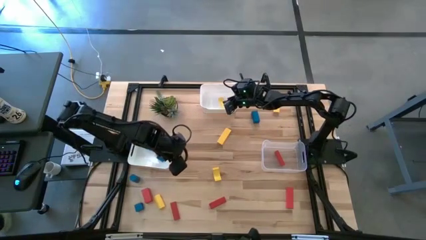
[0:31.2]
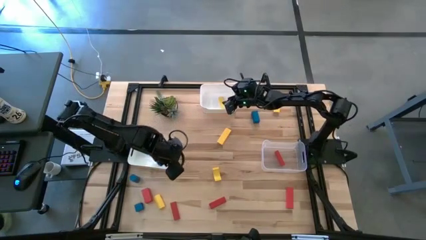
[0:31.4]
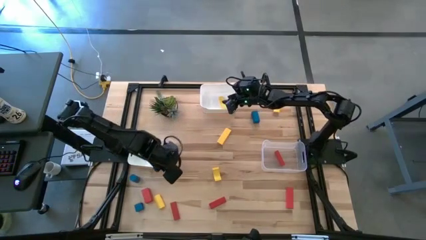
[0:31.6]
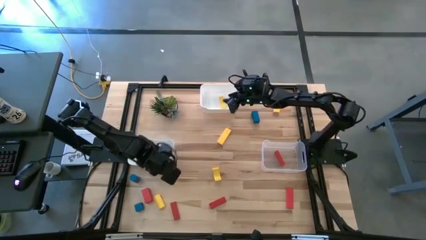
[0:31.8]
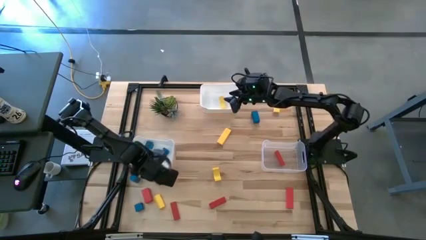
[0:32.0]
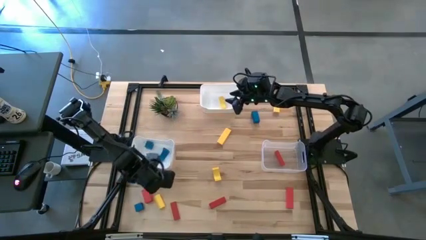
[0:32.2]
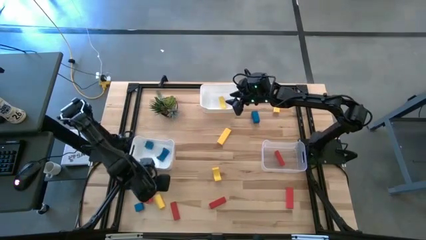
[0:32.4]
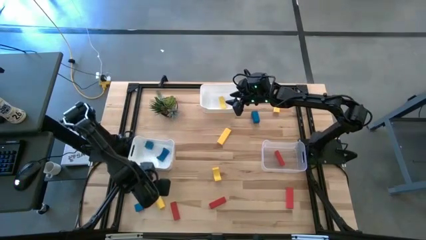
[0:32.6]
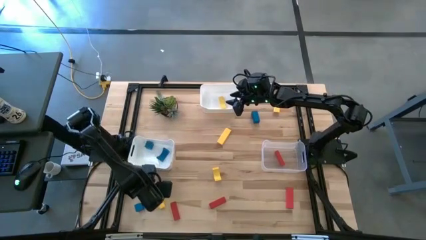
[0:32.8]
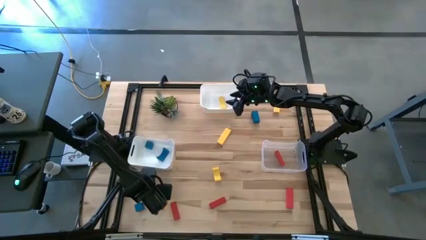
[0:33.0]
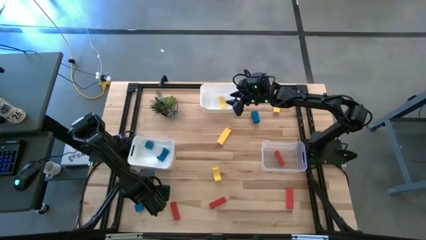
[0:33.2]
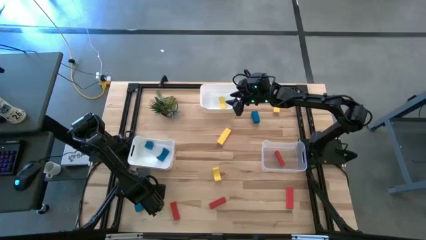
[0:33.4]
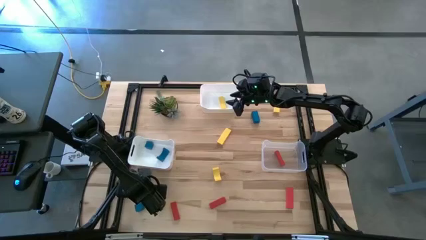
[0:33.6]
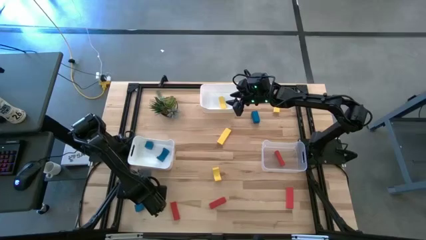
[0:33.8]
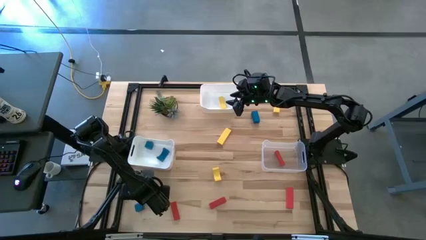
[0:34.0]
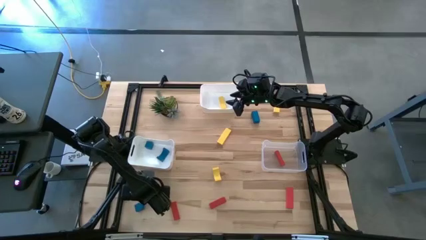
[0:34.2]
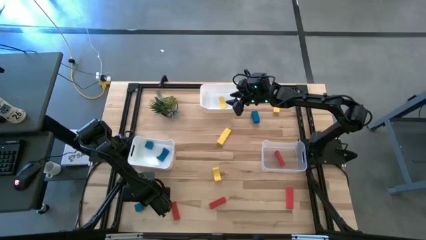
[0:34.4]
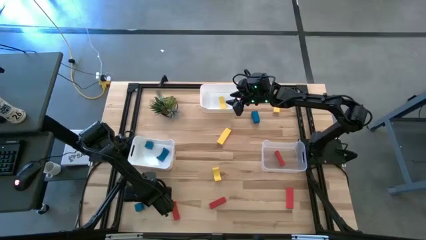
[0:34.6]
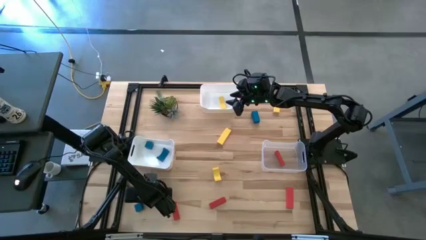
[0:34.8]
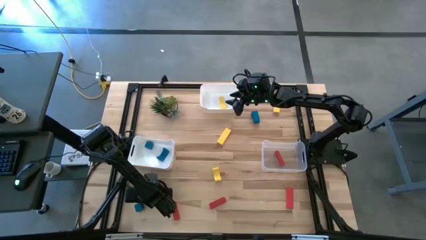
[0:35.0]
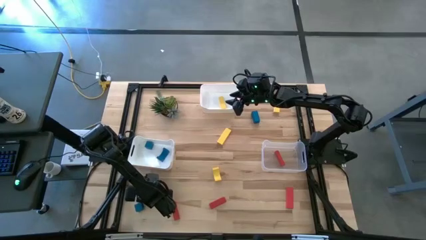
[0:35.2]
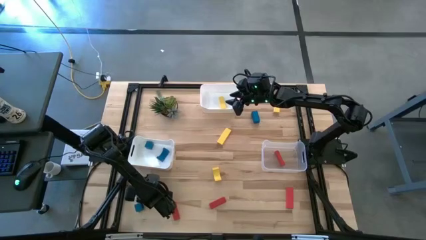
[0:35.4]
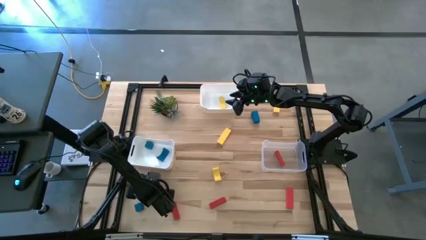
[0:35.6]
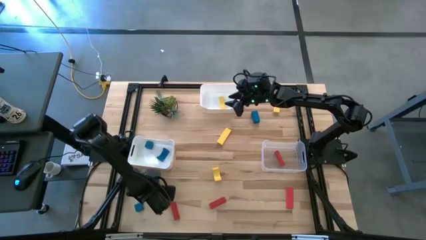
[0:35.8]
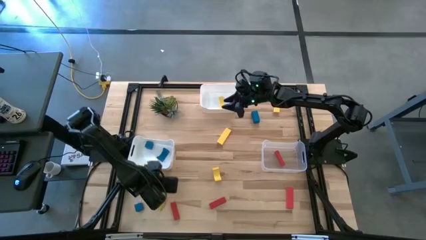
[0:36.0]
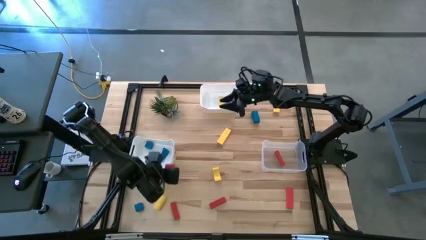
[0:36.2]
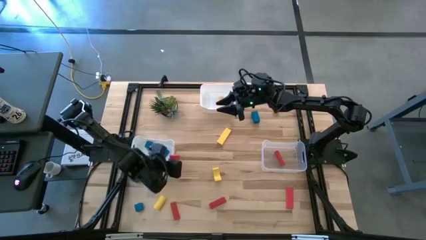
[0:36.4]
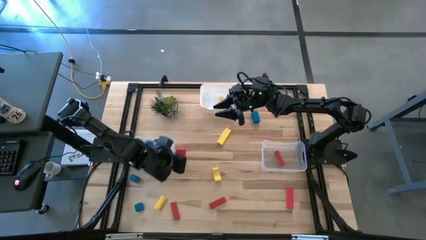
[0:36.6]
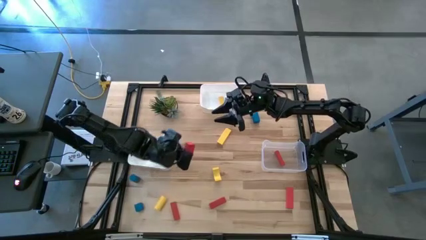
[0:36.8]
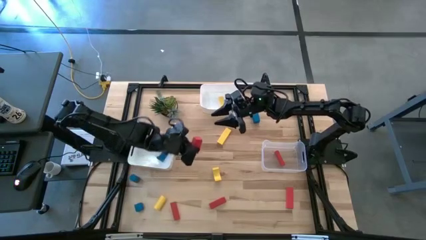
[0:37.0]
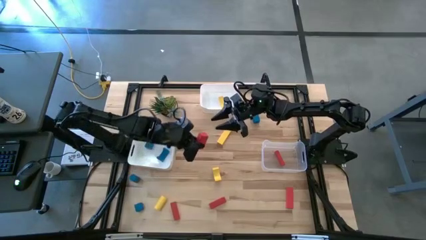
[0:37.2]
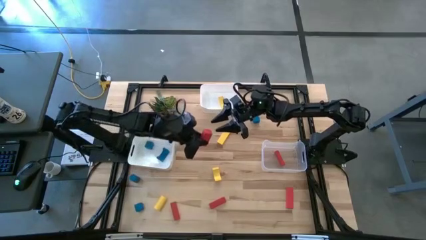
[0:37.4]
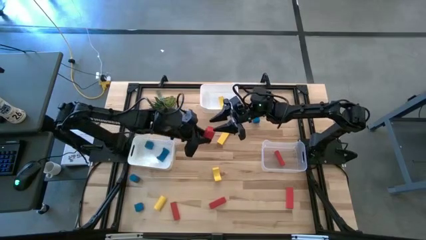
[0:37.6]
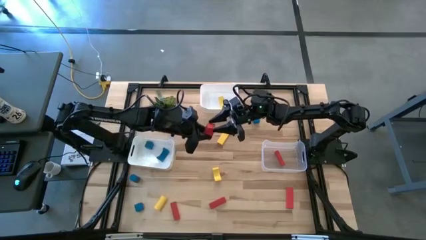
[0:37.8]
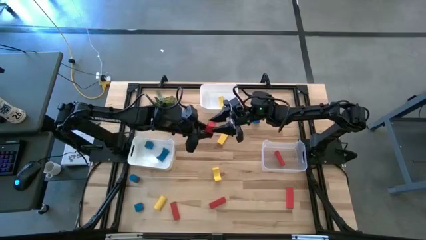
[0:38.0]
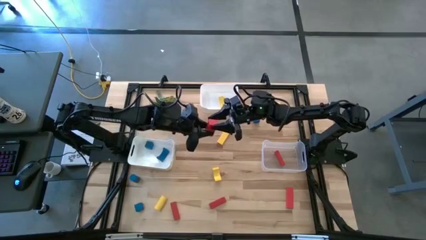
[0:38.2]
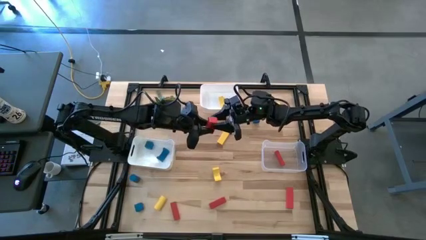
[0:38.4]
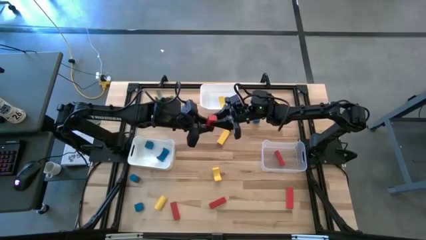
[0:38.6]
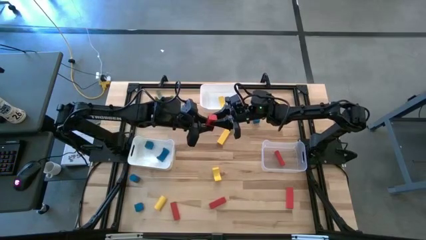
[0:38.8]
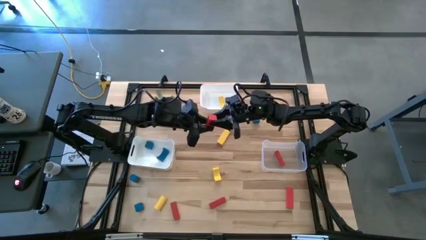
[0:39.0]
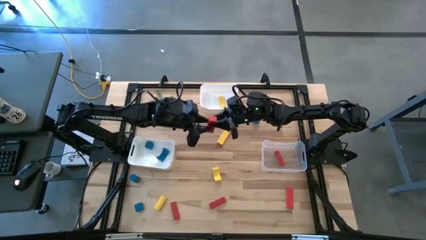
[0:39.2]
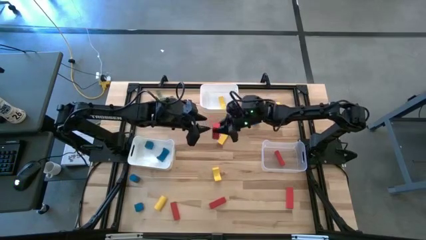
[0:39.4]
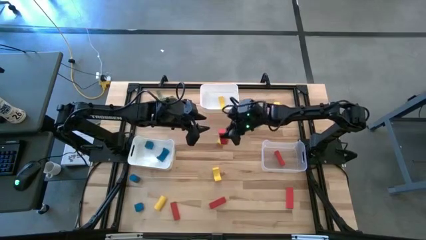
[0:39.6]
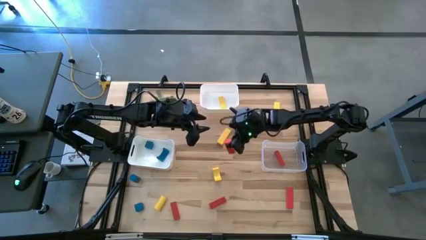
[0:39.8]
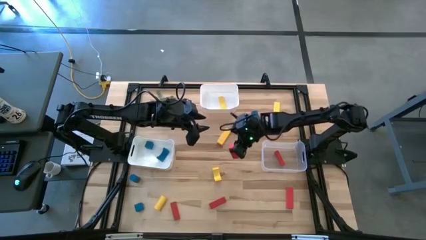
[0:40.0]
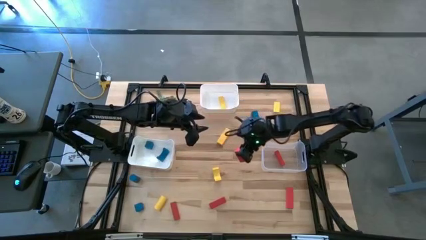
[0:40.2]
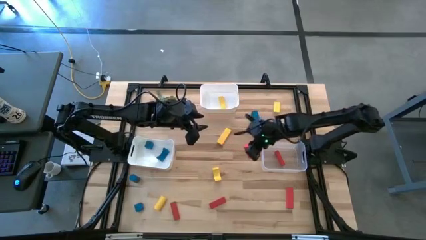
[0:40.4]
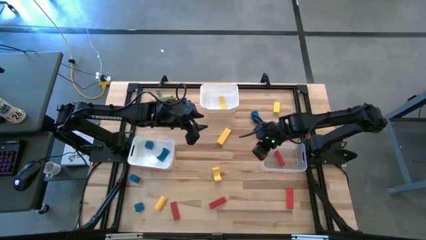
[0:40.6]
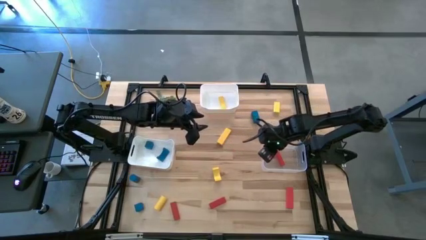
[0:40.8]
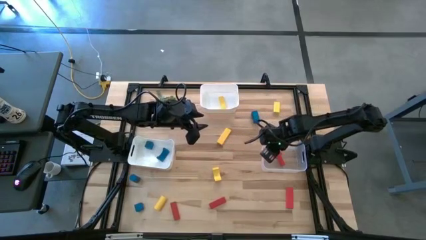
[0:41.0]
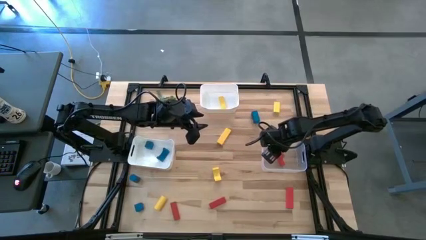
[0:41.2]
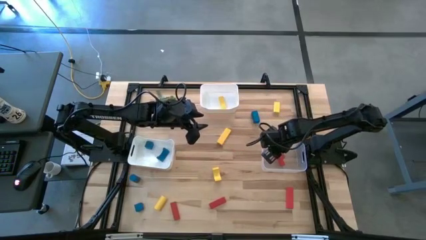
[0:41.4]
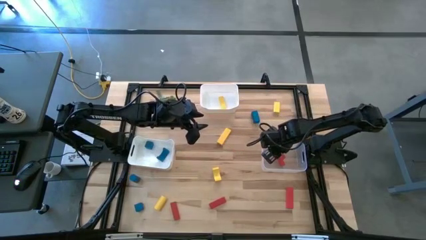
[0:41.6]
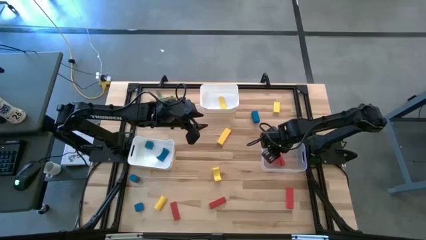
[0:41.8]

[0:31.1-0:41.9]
Task: Sort & place blocks by color
Put the bottom left red block into the bottom right transparent bin

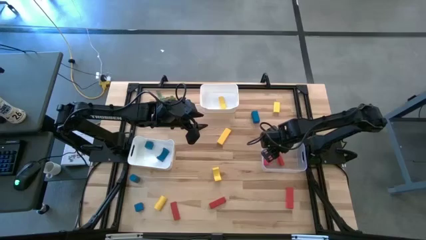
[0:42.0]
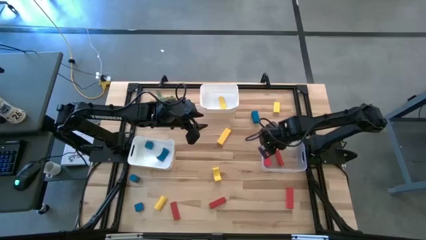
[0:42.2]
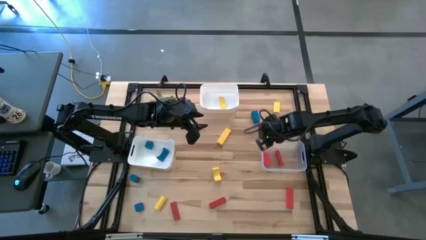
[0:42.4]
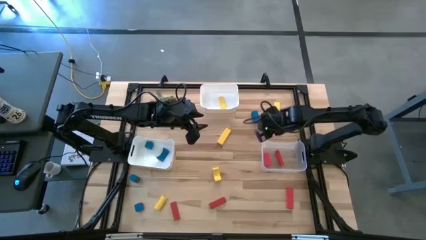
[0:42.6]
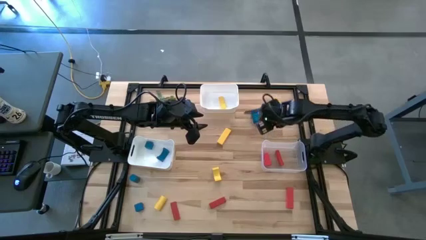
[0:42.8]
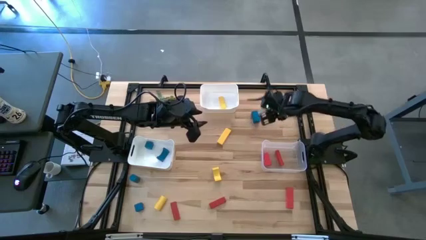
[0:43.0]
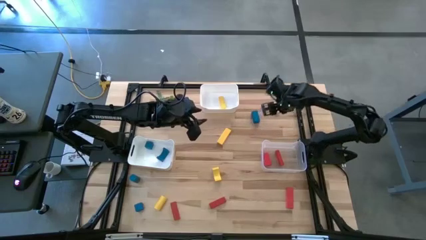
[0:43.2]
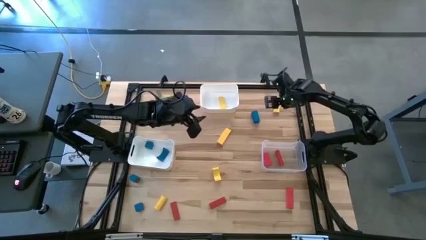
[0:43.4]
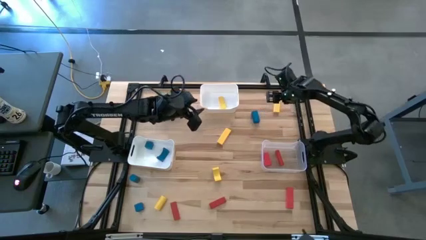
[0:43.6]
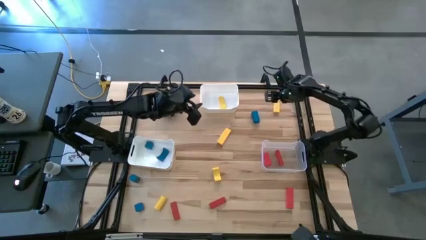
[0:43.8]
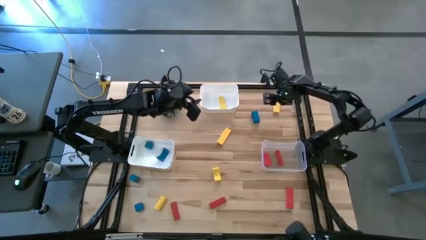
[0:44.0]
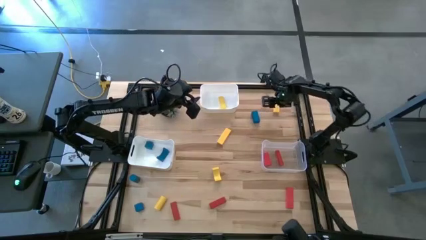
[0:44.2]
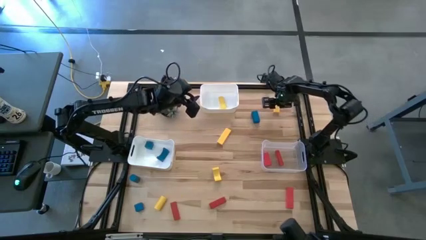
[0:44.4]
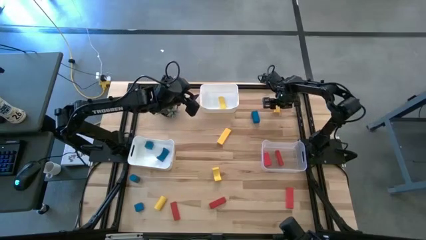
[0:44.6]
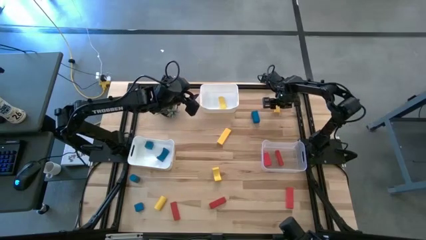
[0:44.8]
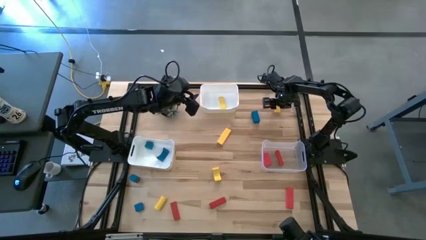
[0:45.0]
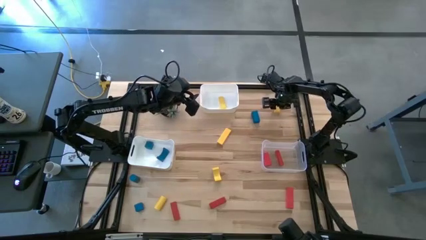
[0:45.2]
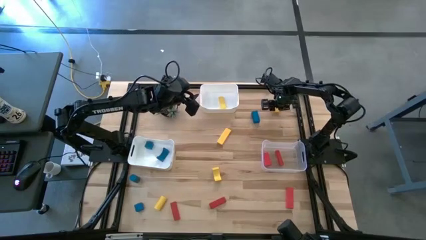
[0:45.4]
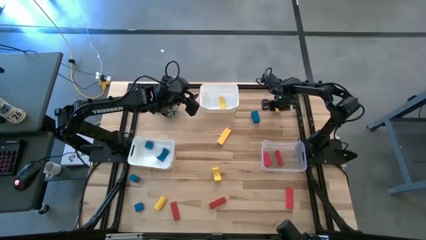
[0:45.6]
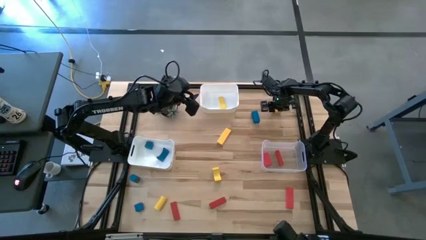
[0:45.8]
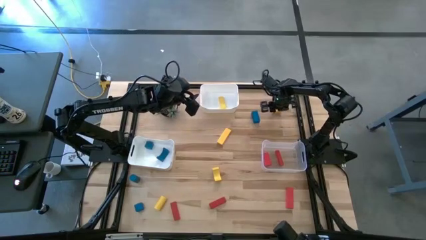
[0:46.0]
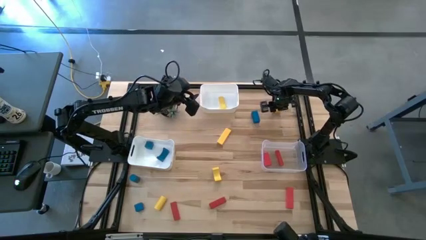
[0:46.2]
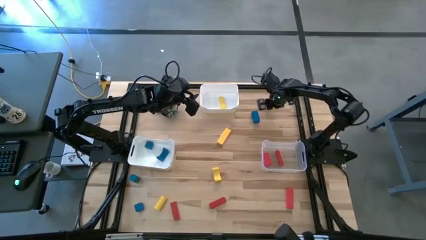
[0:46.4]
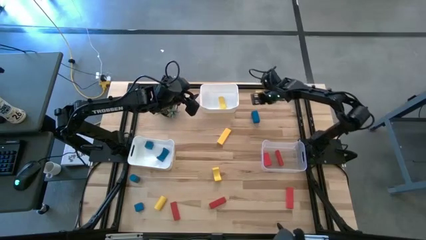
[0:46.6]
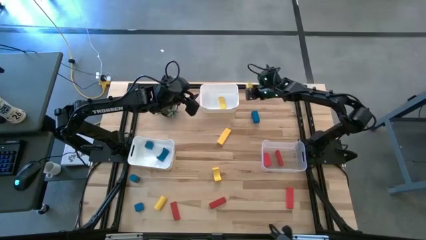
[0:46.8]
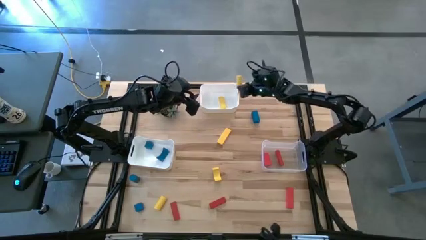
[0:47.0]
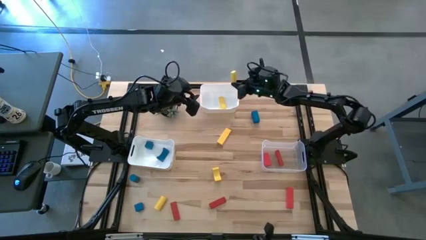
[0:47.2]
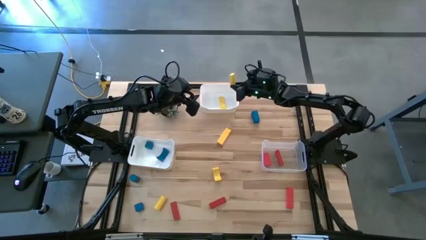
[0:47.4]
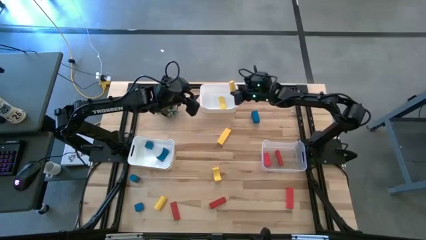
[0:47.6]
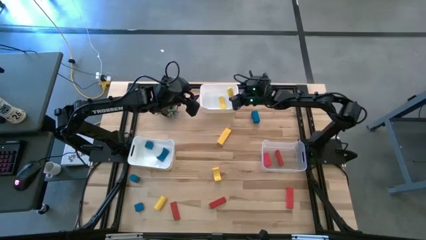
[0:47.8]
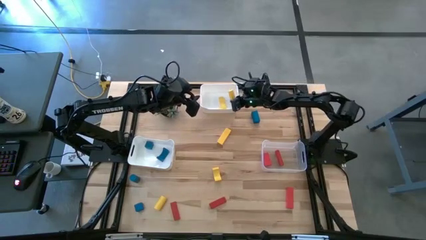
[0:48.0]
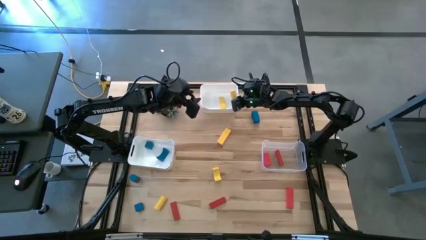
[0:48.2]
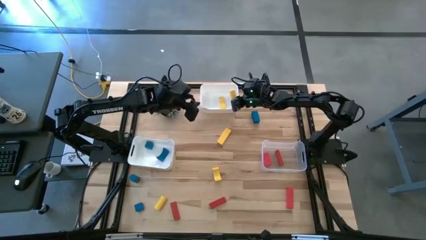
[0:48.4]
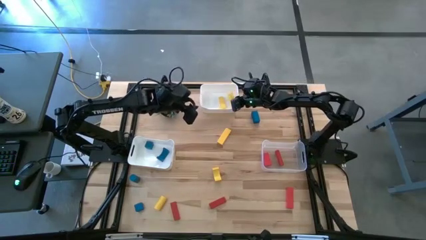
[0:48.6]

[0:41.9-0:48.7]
Put the top right yellow block into the top white bin
